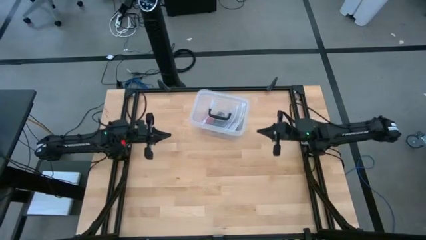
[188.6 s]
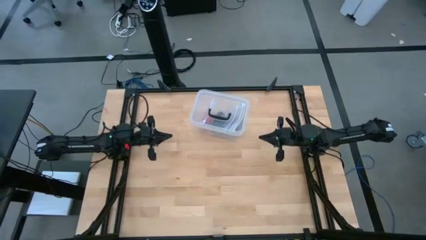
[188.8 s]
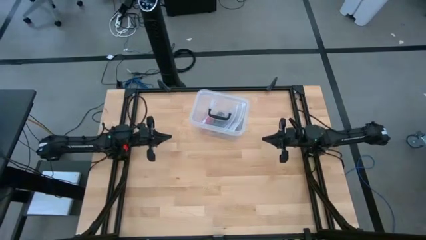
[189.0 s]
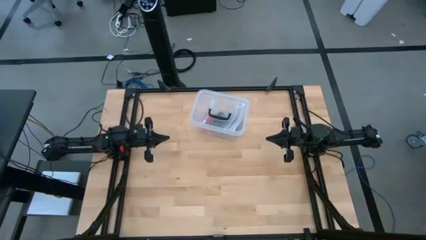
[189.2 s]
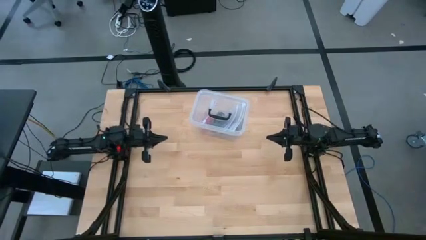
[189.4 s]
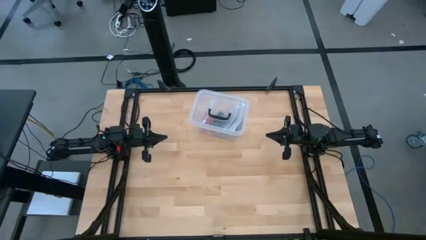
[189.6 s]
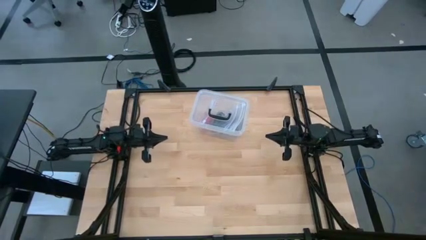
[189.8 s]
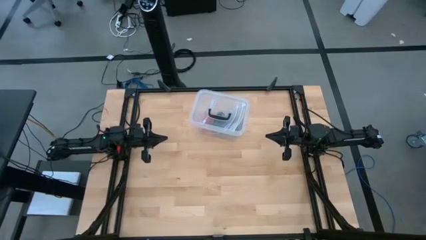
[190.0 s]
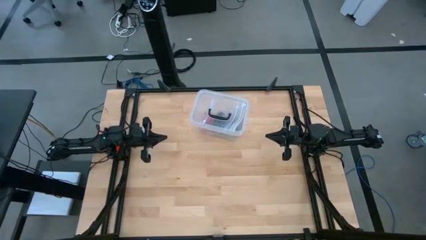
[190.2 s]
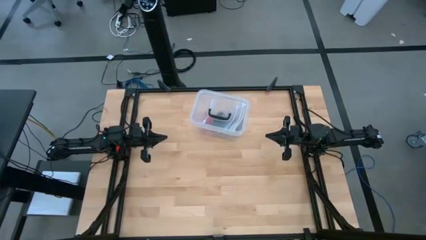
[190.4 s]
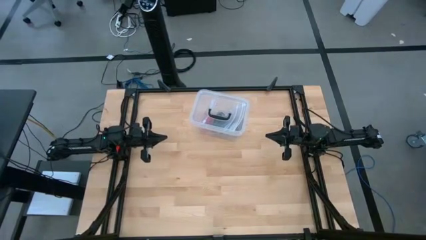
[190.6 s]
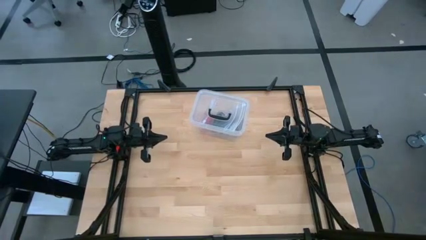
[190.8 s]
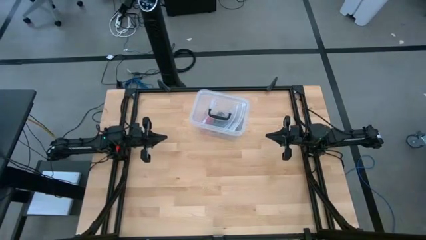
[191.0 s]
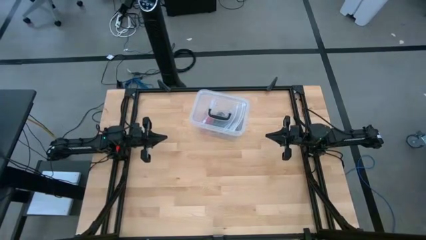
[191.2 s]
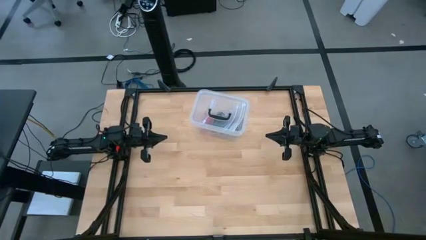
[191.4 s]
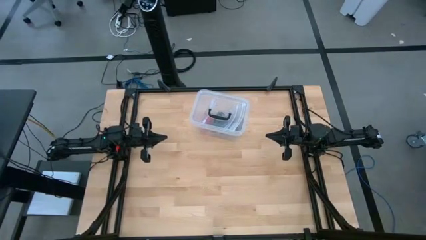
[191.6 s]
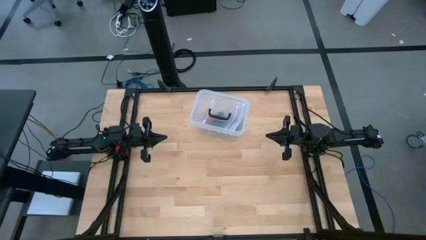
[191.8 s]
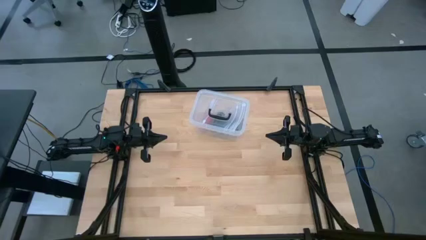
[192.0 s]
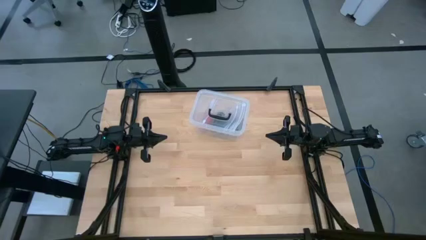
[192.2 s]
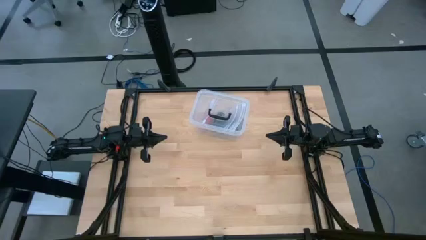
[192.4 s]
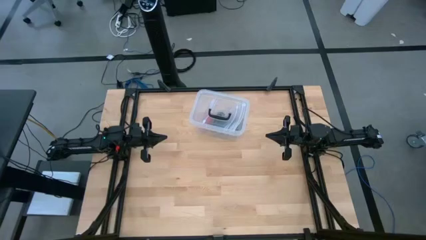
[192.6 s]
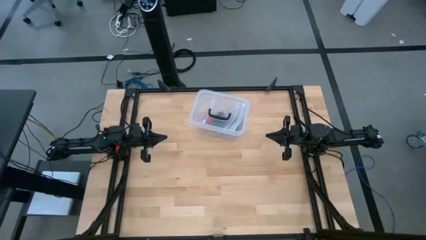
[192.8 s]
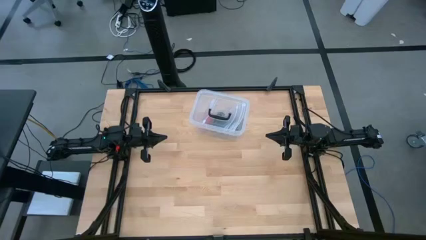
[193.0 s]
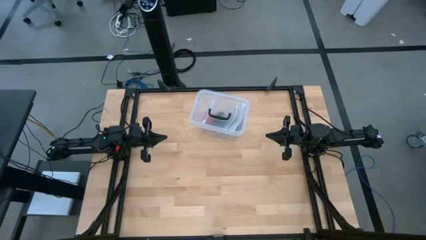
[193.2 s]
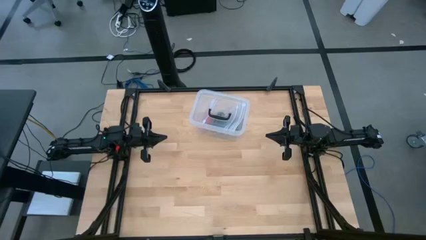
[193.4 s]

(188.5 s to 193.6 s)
Task: Roll bandage
Return to Home Position

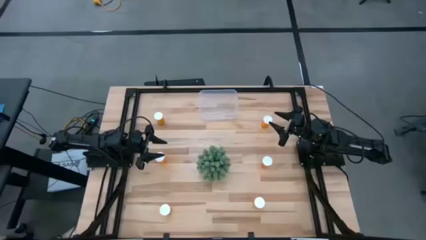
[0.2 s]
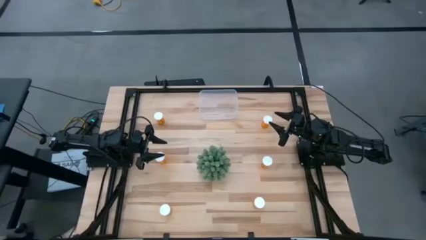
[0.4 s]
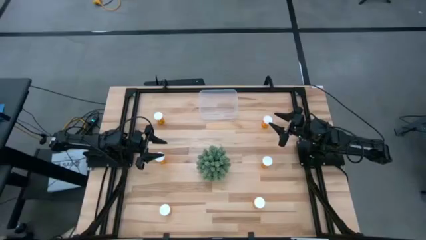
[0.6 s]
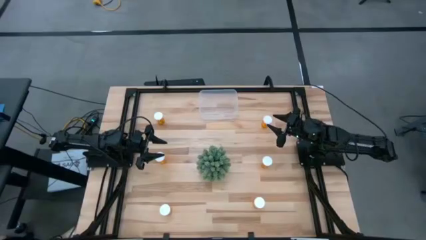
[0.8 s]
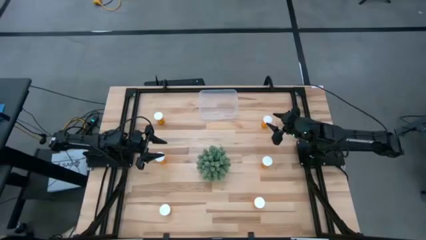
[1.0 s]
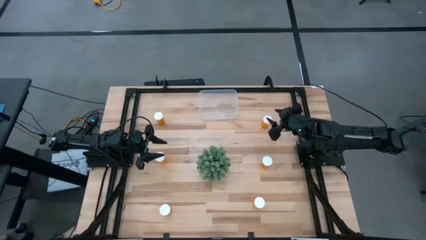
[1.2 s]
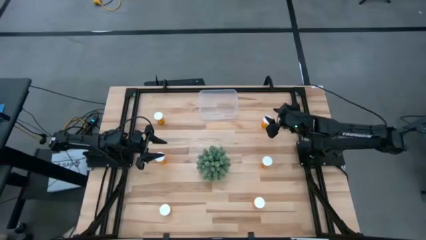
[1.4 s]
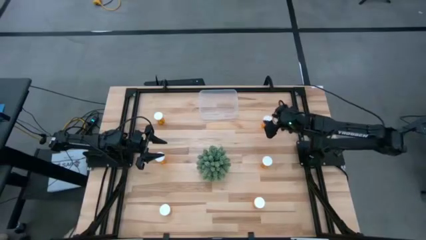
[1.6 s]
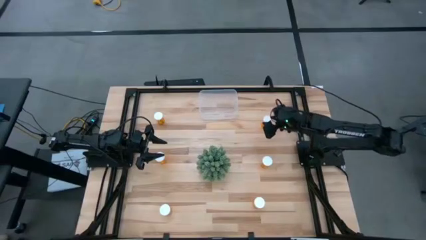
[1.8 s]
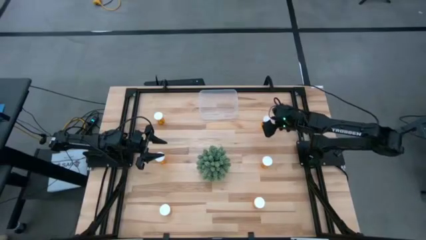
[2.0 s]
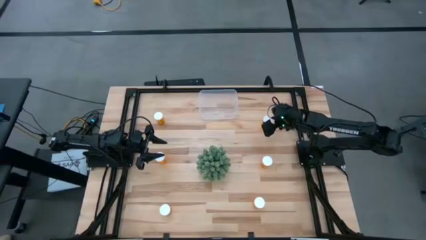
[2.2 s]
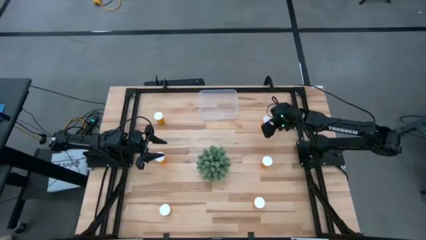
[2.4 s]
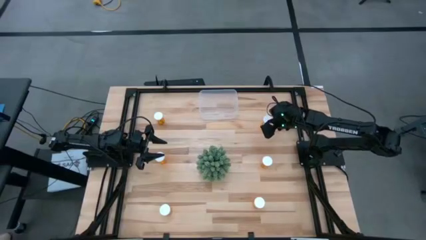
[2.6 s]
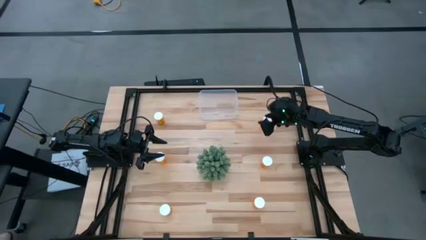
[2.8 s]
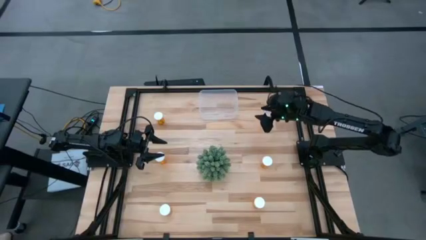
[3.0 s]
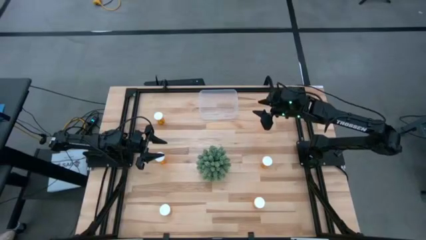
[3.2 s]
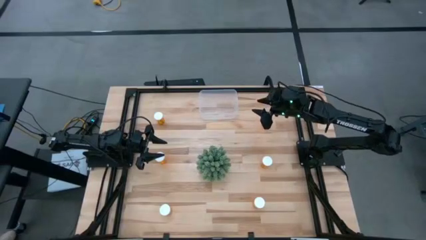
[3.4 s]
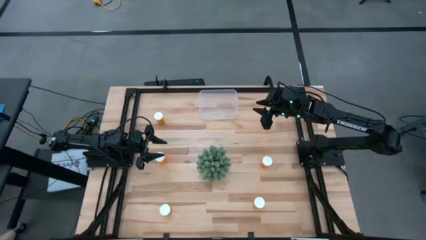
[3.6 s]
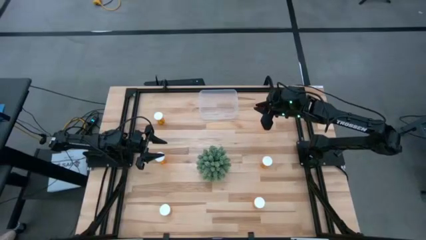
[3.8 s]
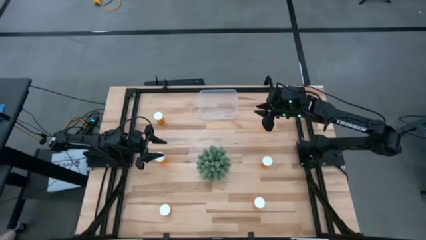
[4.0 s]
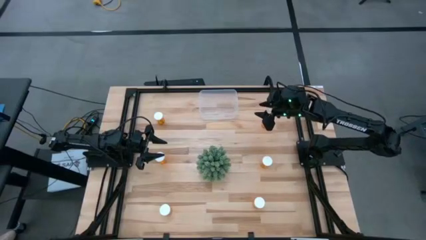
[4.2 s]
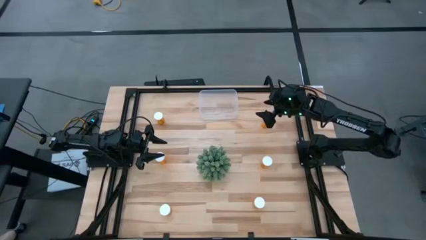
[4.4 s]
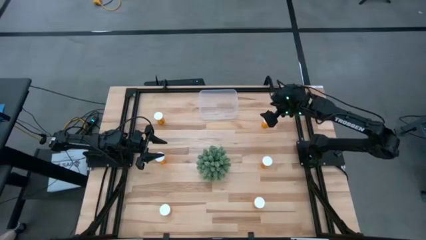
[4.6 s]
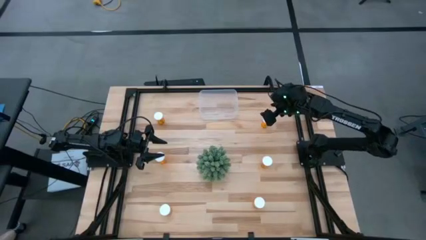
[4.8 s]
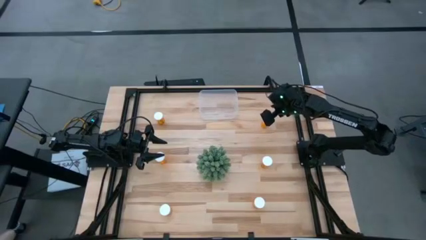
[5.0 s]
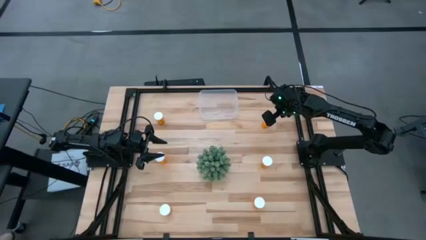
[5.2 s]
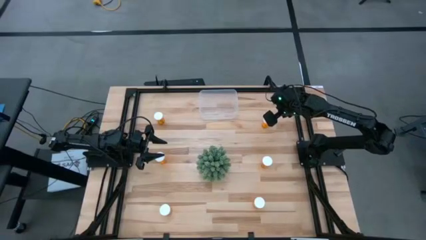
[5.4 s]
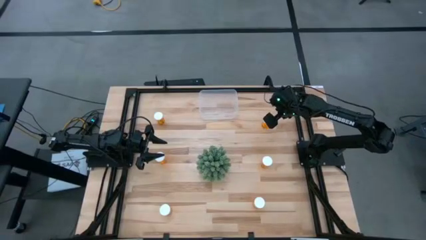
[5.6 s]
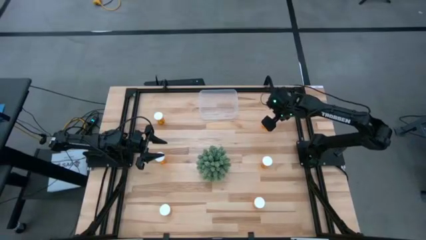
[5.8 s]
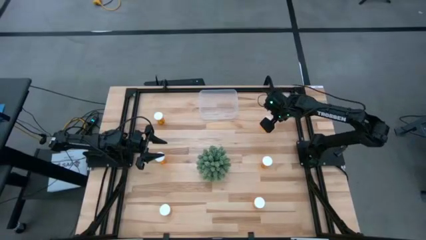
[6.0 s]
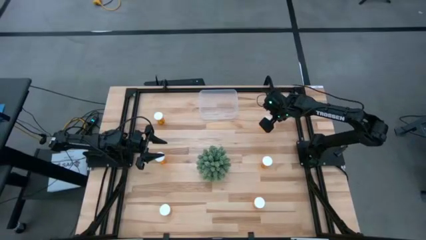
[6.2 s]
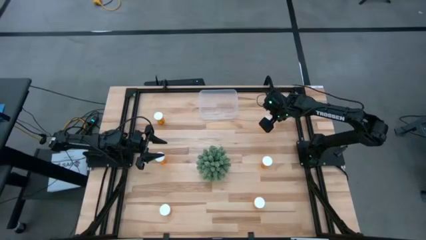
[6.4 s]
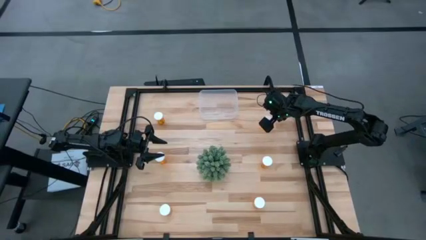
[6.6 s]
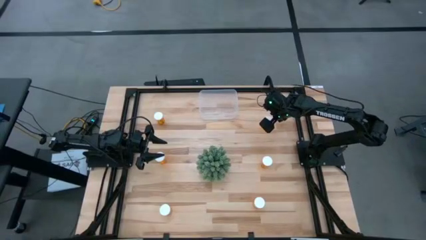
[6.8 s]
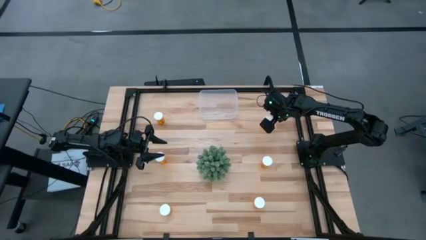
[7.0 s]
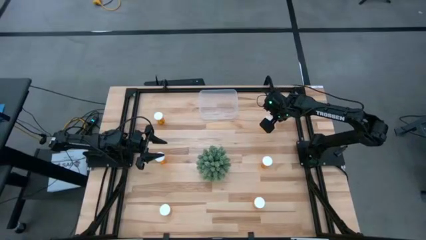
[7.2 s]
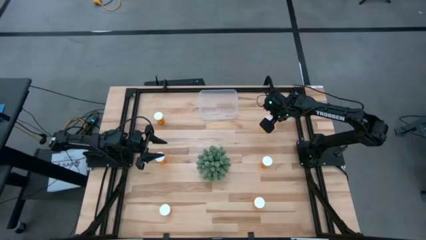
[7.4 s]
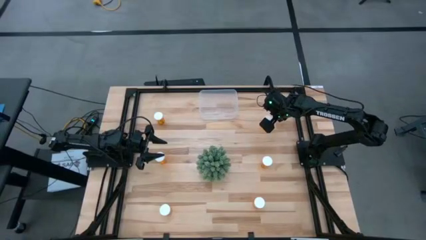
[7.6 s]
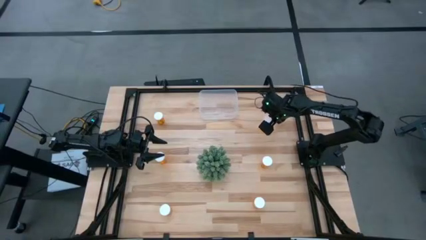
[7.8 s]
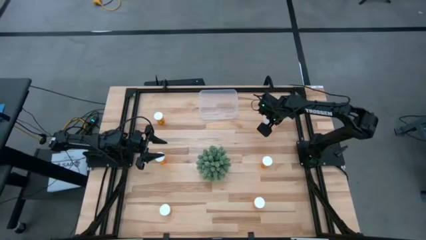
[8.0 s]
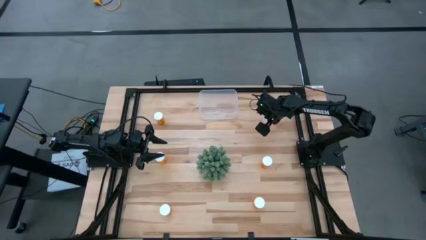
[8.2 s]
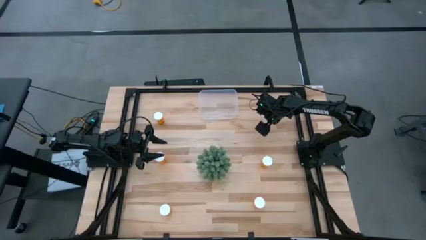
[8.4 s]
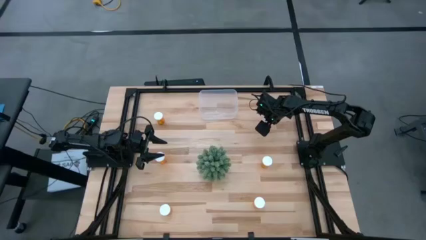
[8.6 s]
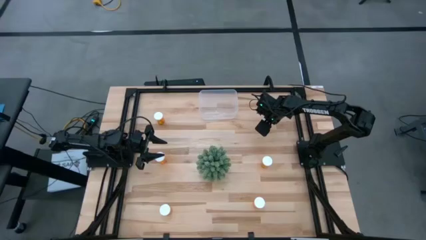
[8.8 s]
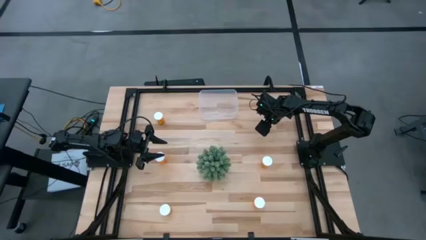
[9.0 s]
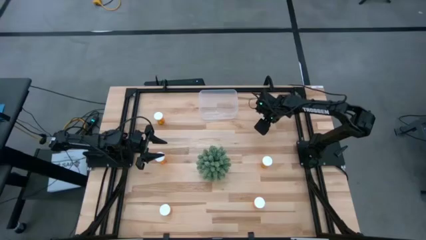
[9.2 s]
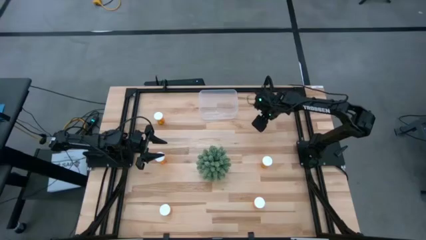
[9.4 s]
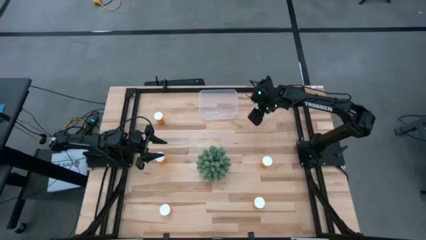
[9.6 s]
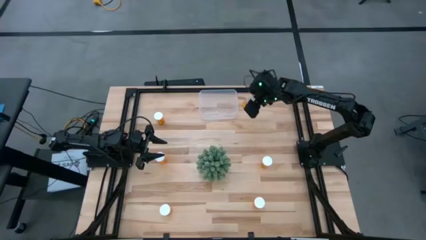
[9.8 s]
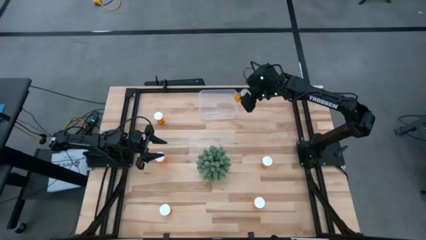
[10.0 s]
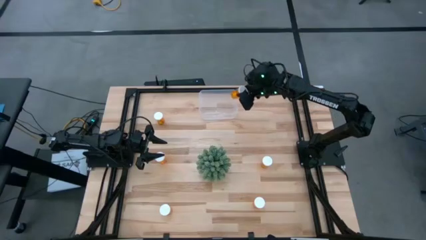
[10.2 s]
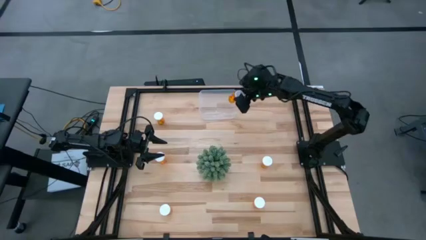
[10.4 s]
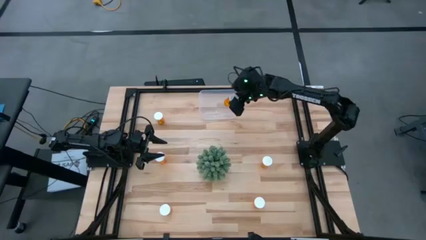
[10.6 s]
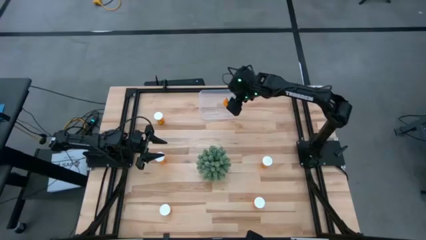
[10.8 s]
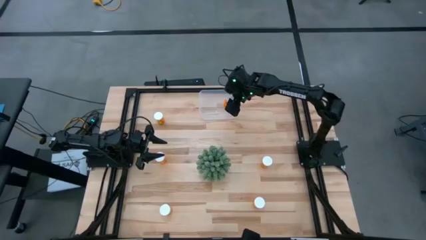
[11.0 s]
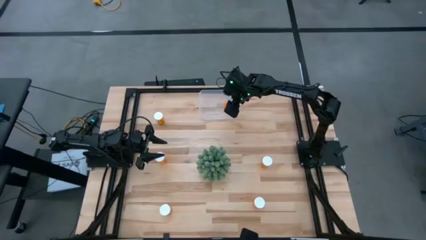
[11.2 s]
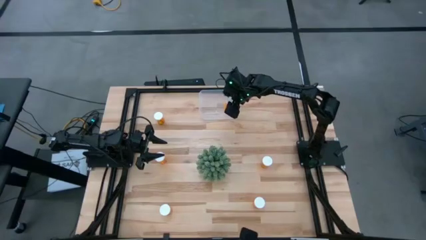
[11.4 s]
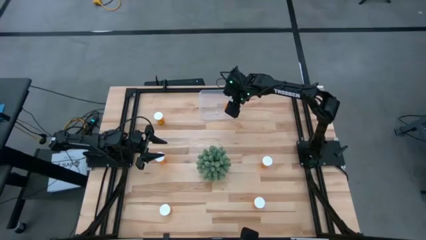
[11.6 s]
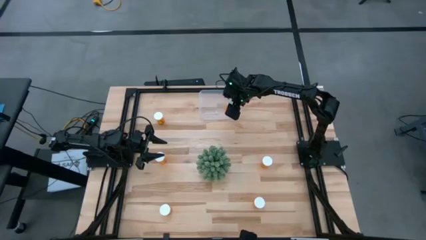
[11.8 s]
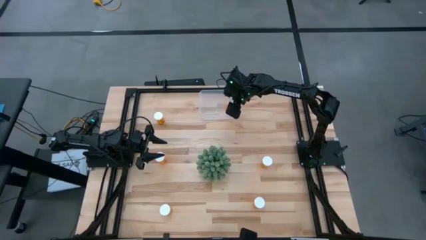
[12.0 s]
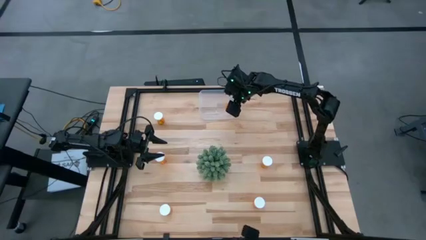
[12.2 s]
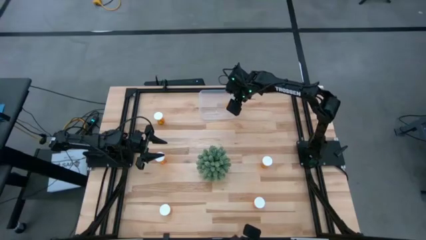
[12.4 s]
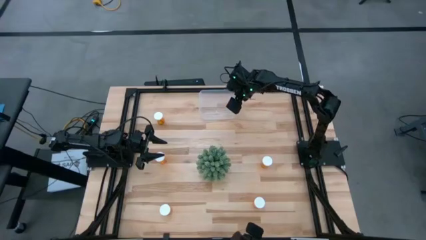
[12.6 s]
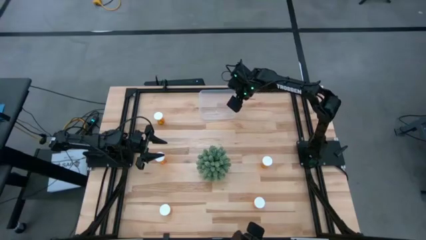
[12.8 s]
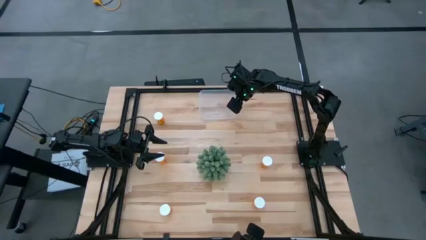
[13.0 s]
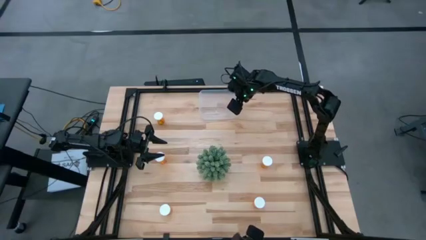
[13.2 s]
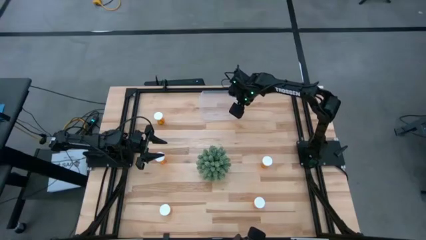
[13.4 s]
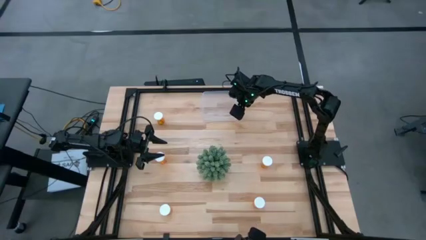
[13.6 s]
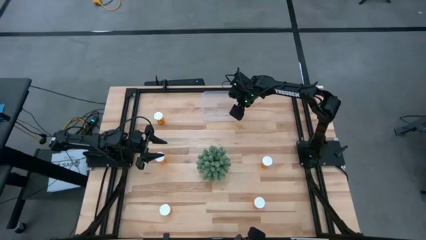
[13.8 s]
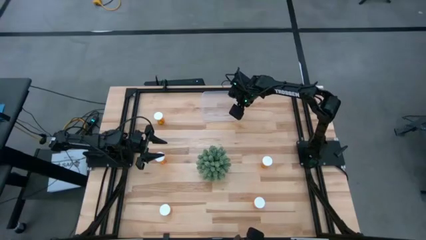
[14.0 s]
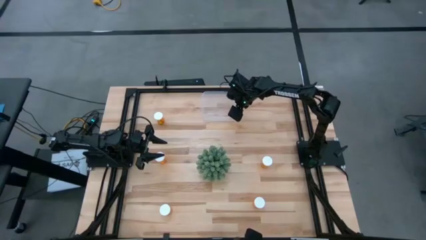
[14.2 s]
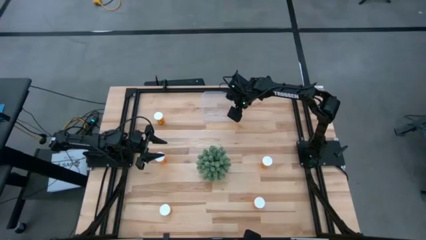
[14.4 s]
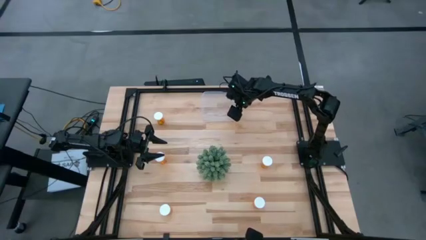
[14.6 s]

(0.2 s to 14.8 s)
Task: Pick and place pill bottles into a basket
Put the orange pill bottle into the transparent bin
